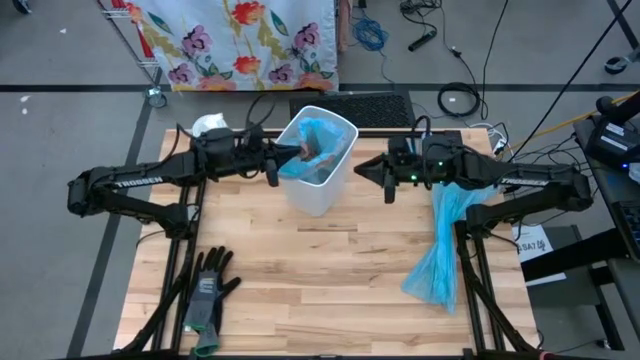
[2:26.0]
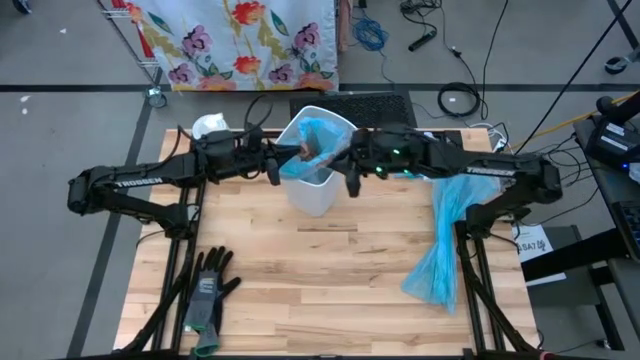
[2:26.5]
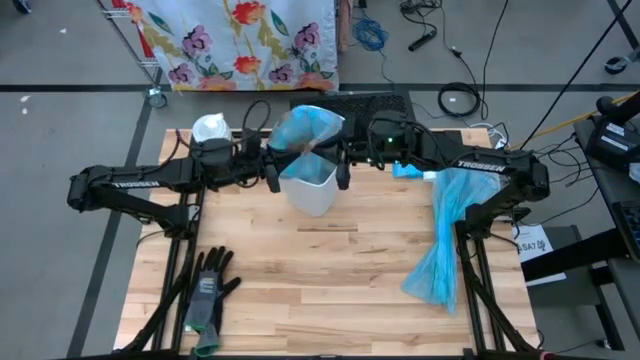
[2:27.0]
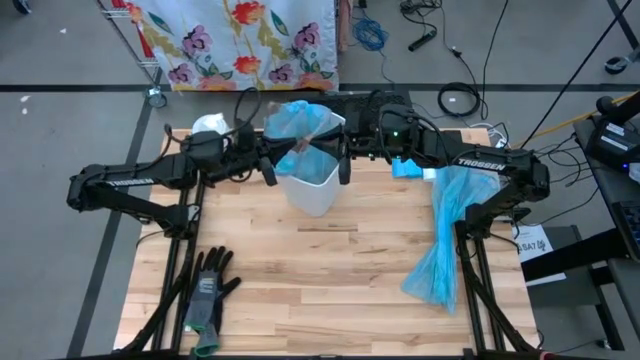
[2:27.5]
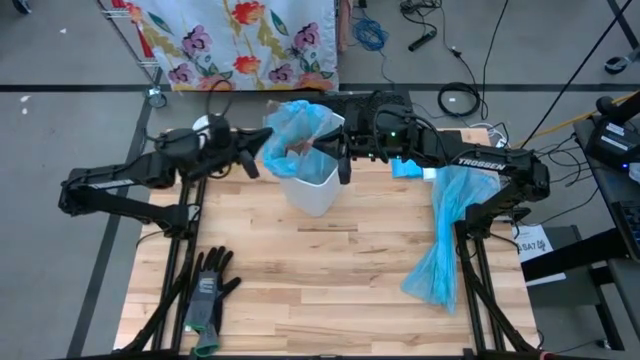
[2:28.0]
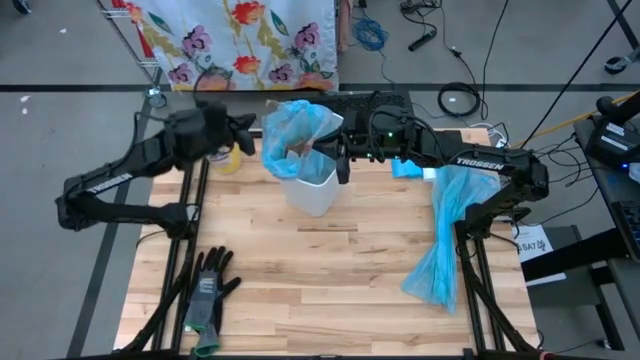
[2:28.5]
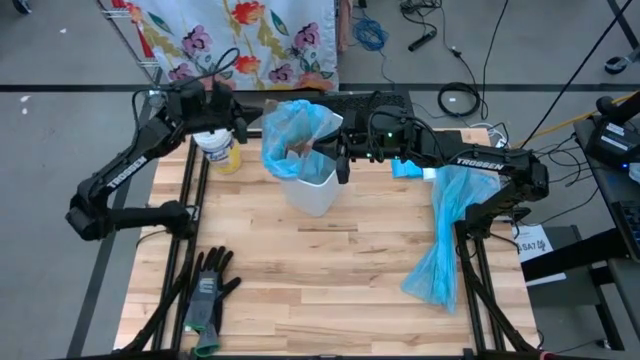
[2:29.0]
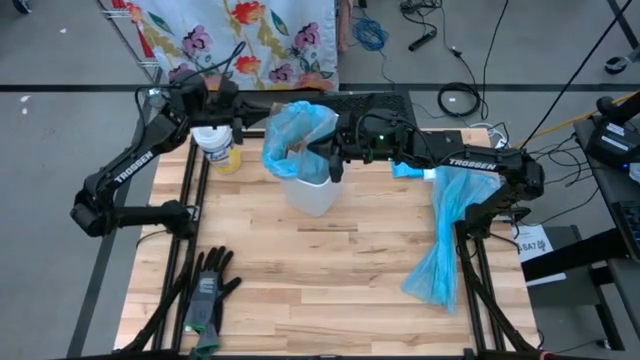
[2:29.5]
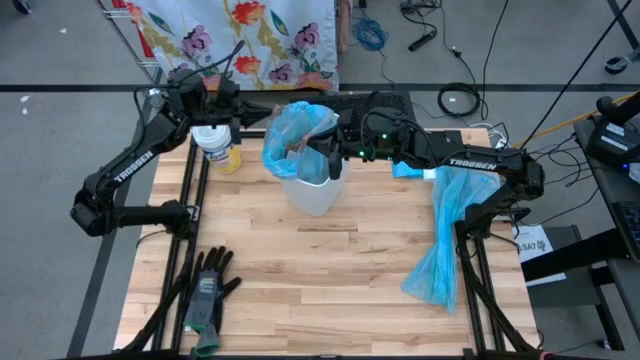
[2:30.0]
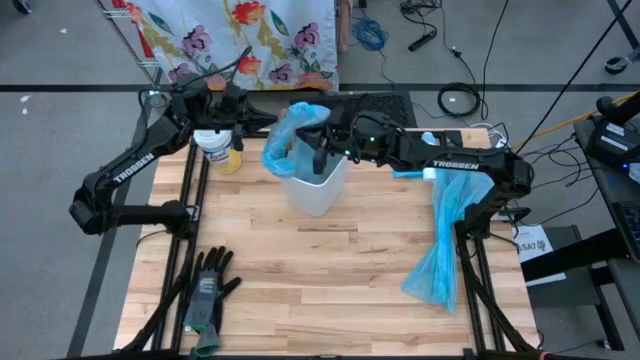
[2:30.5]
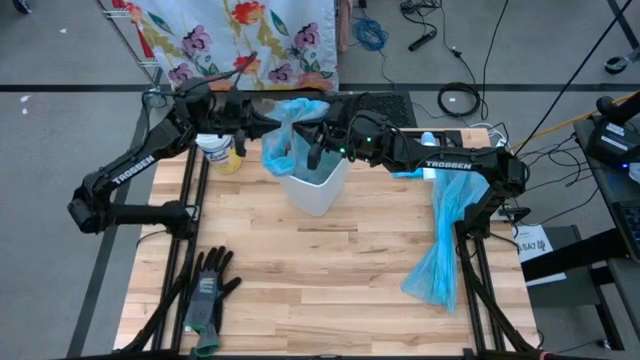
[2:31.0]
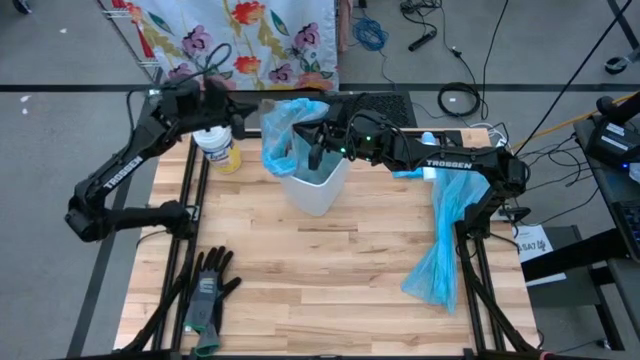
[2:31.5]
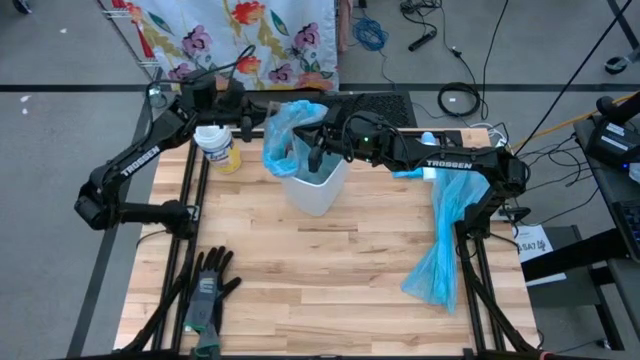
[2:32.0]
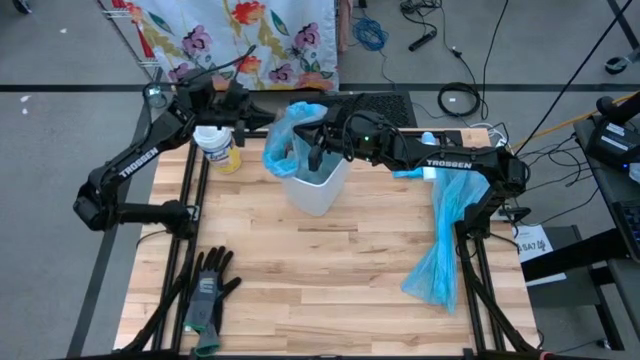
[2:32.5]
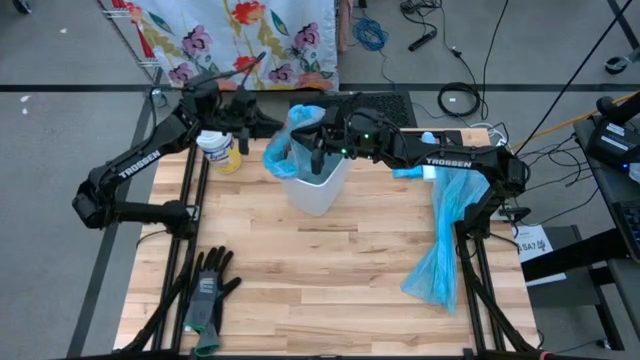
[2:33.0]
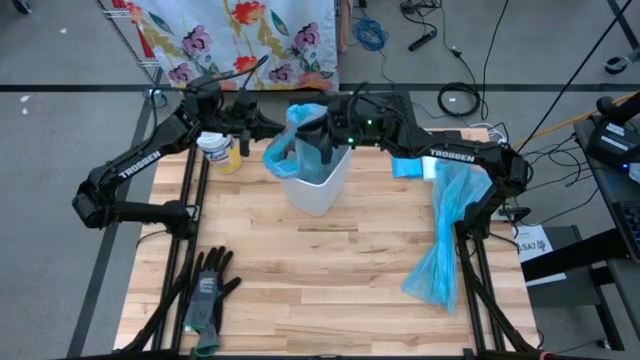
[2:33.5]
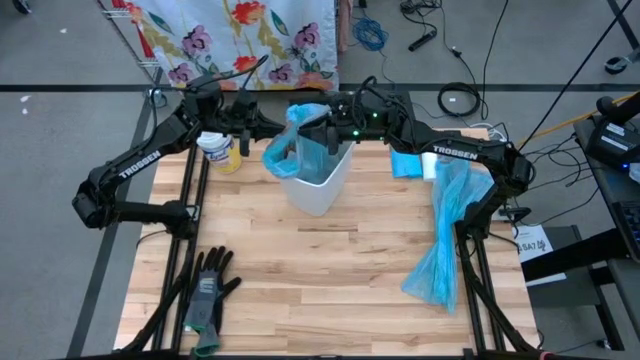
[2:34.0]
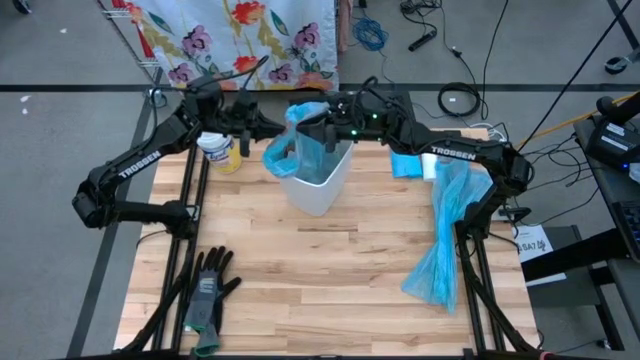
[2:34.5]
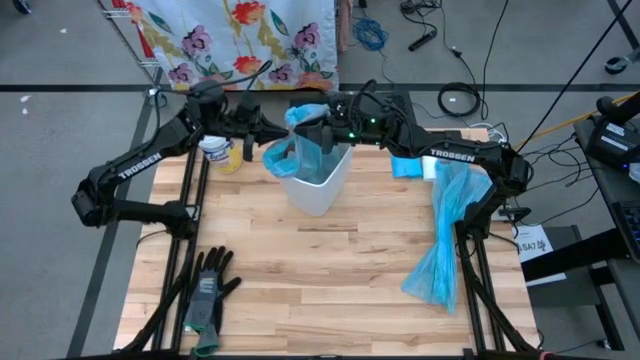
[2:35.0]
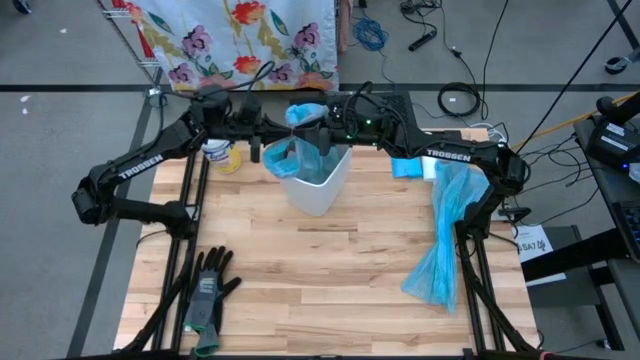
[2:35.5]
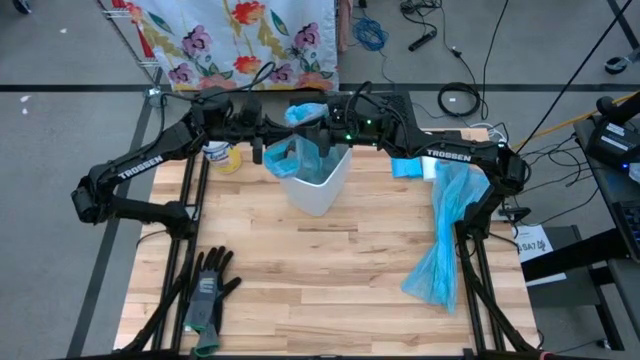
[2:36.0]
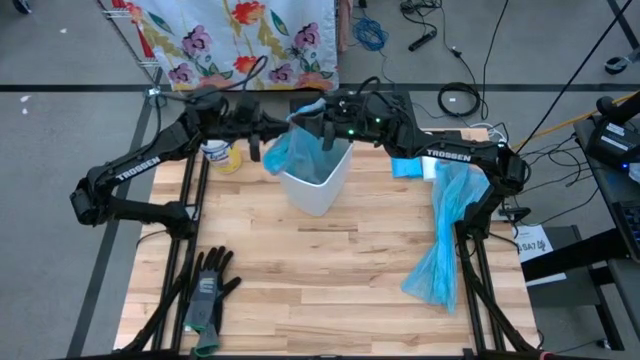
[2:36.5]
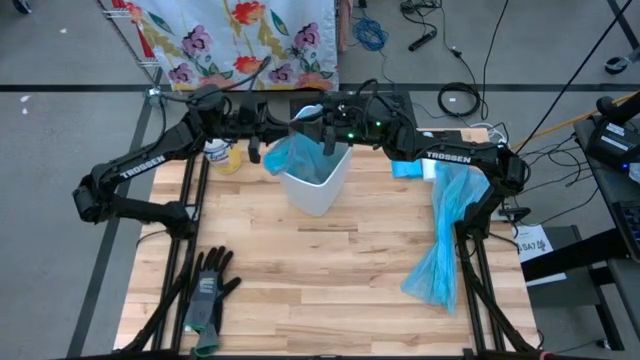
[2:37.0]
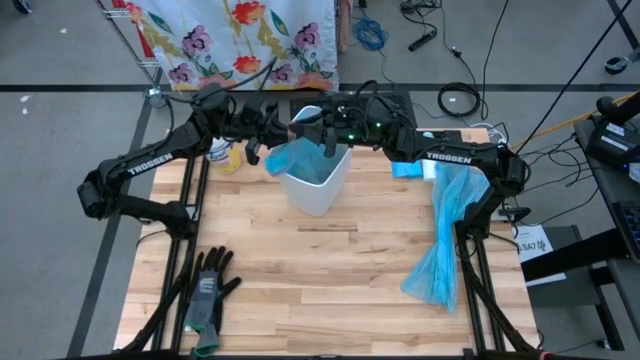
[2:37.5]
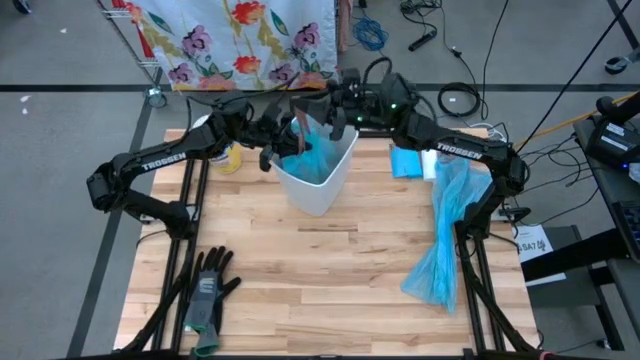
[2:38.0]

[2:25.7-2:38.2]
Task: place trash/remove bag and relplace
Close the trash bag

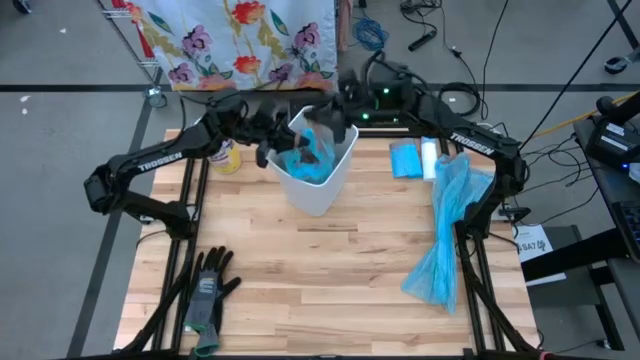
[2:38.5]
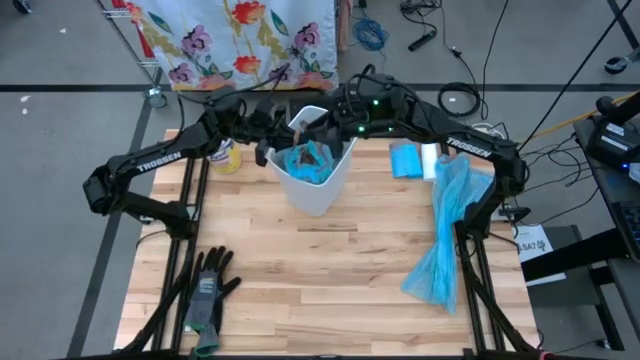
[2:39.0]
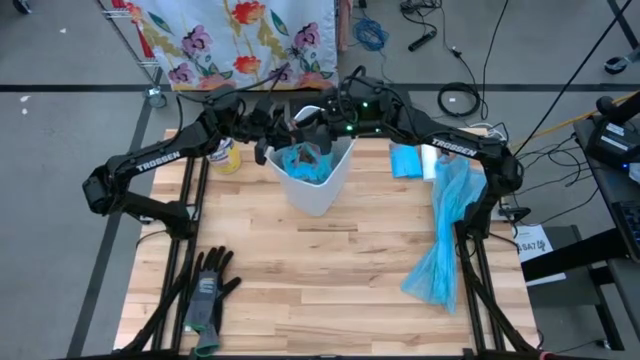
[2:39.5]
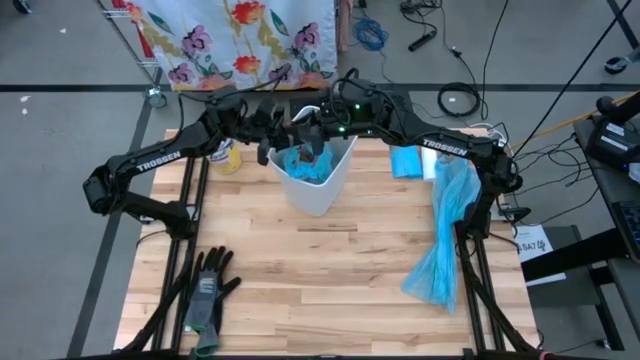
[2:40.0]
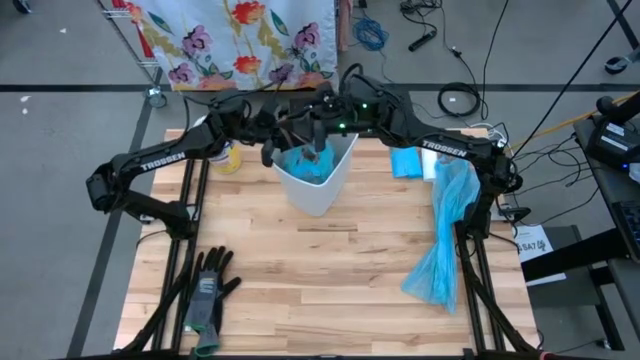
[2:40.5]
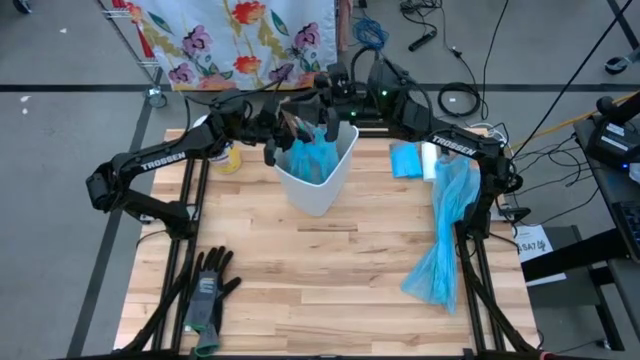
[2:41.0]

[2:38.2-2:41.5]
Close the trash bag

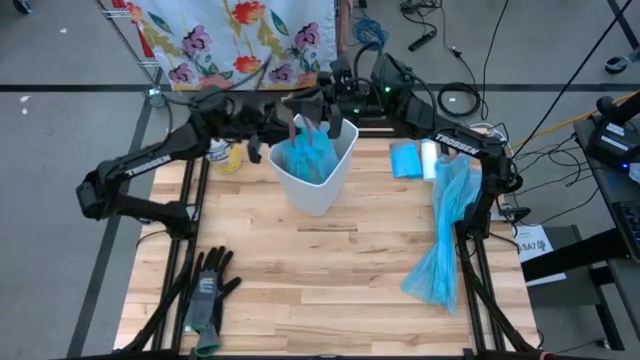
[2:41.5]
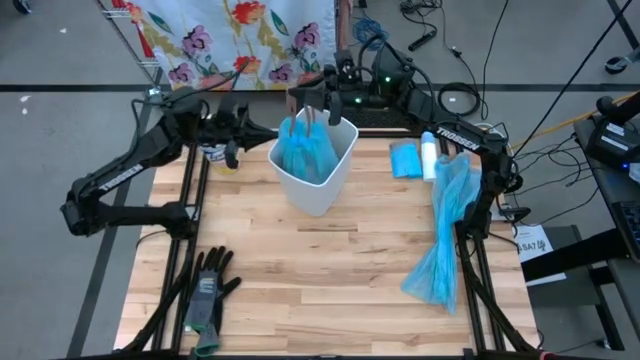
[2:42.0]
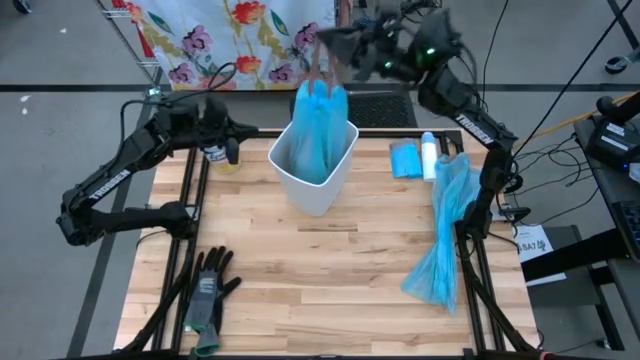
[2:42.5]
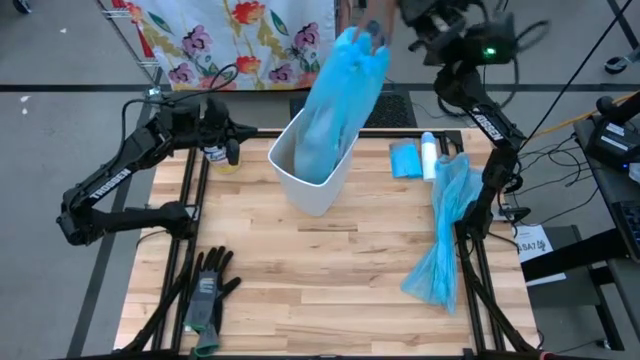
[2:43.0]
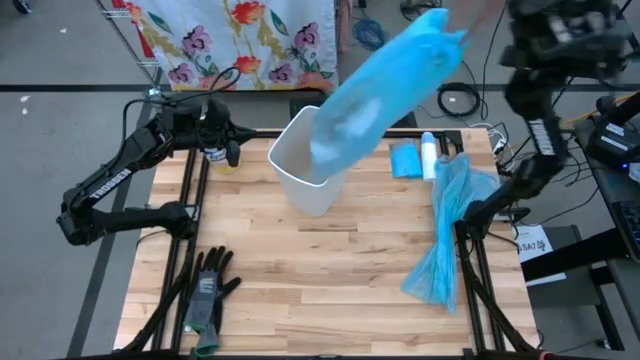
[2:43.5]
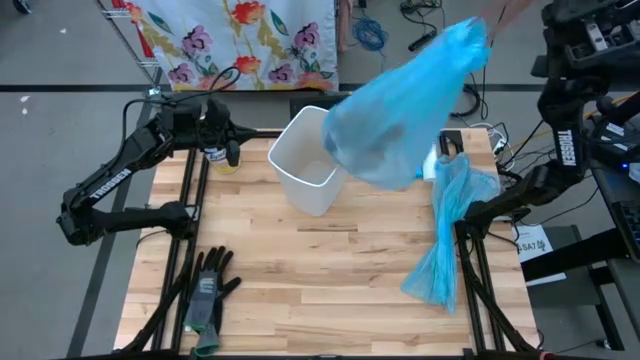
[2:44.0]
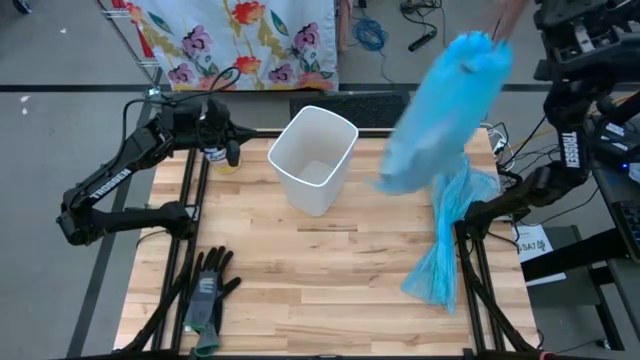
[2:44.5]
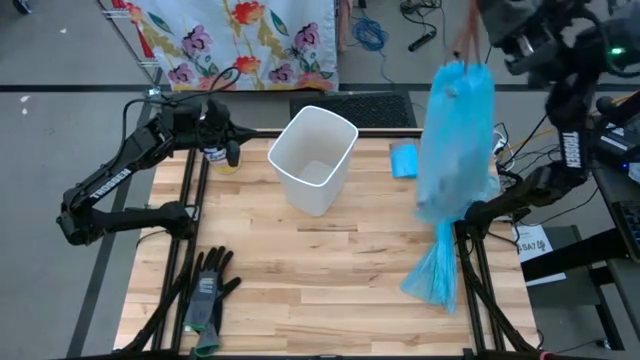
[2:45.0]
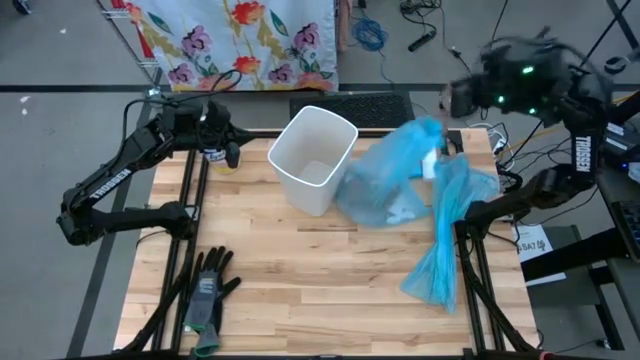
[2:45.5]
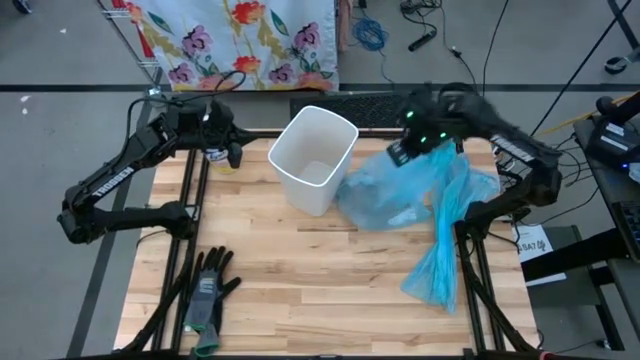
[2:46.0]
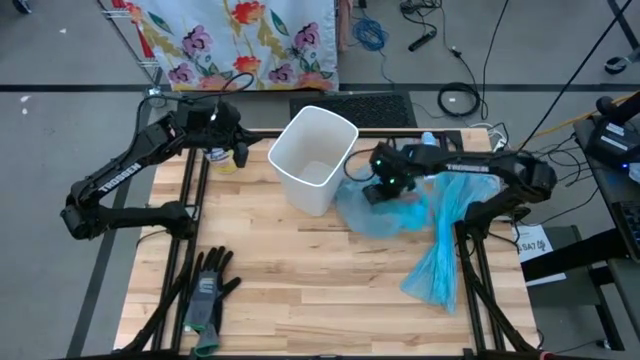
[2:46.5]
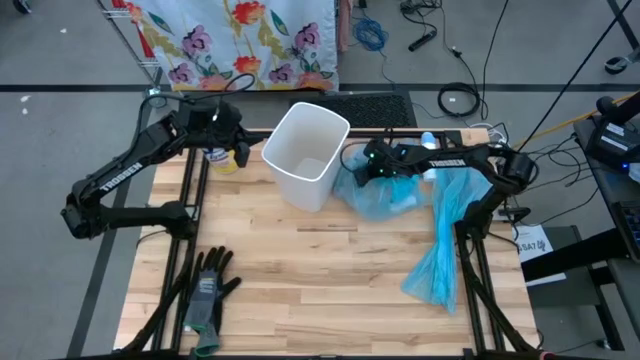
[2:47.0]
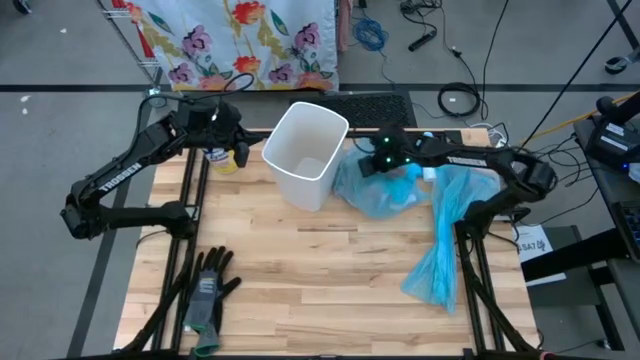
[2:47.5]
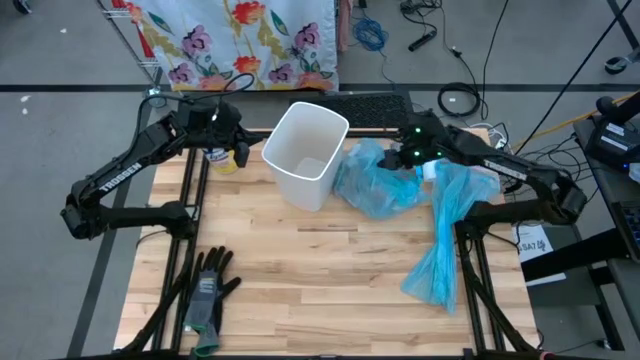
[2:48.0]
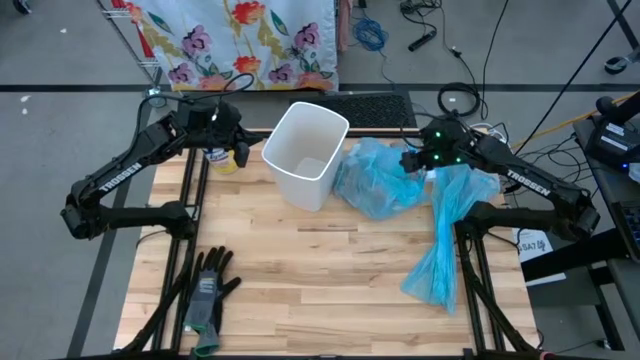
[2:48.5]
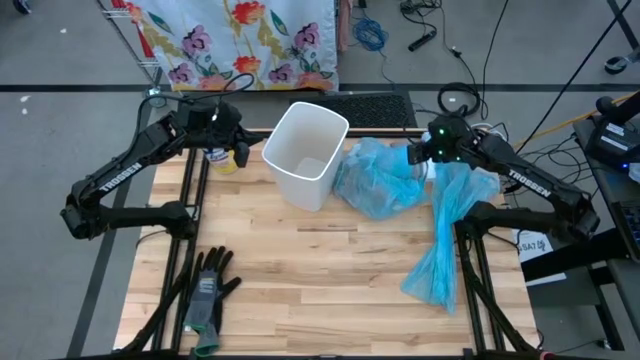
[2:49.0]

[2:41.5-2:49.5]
Remove the trash bag from the trash bin
